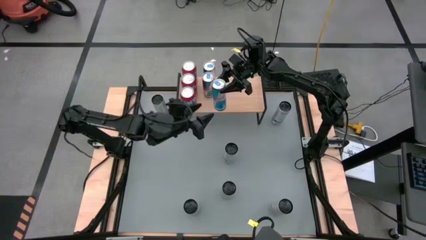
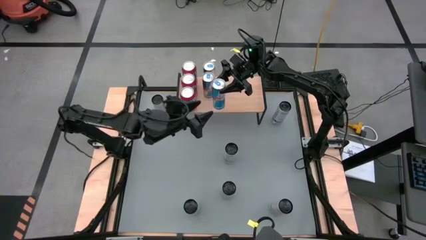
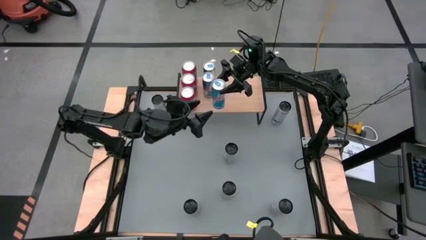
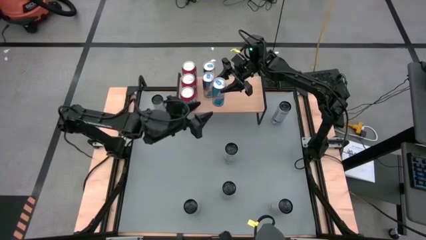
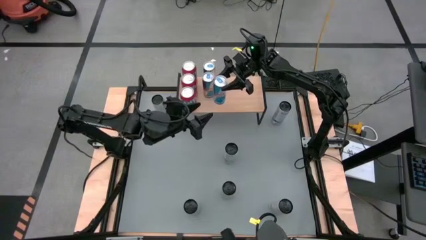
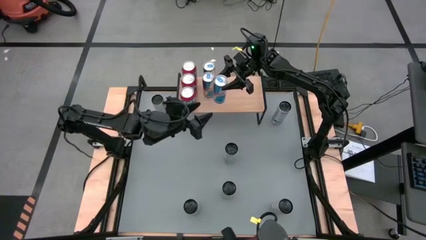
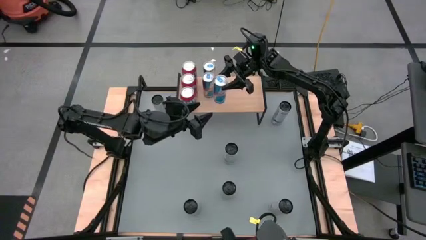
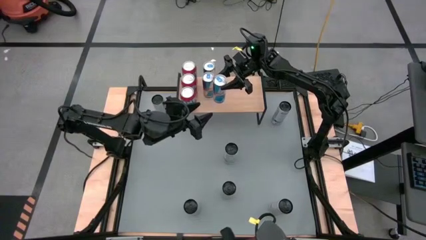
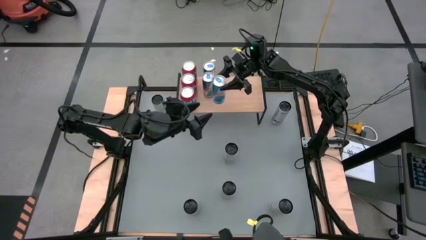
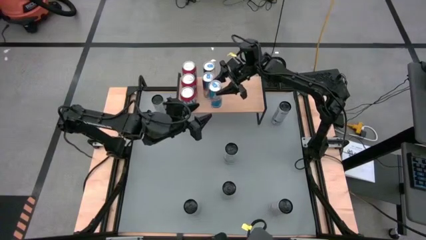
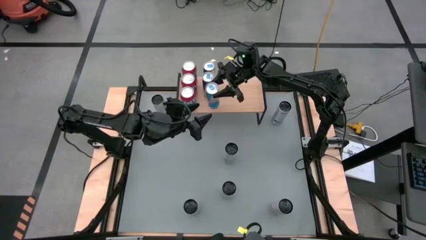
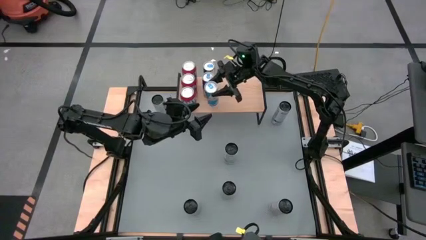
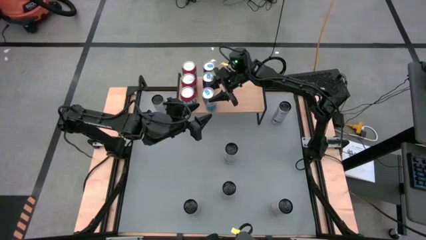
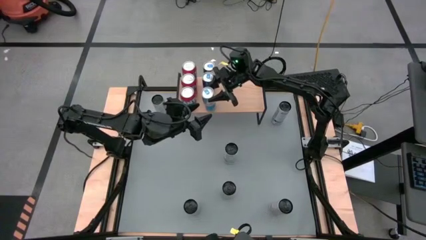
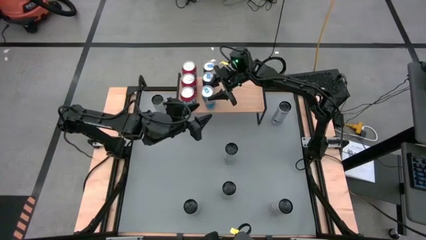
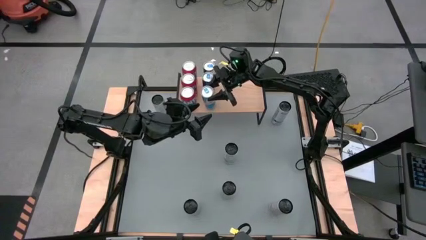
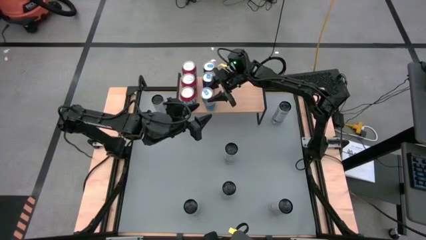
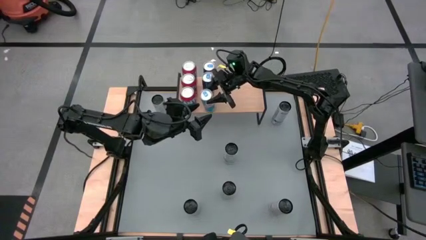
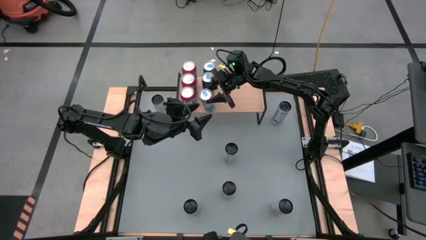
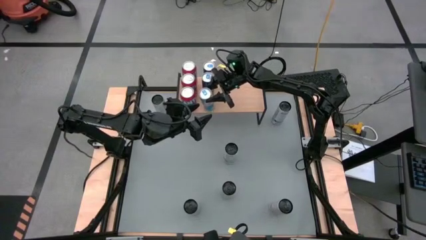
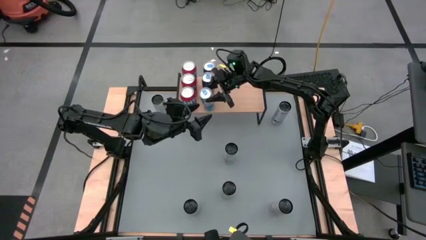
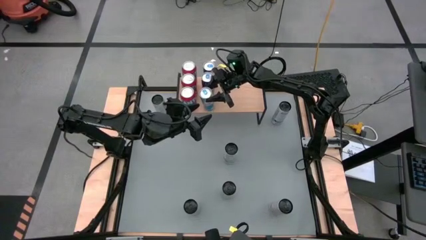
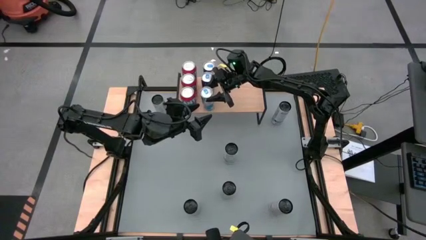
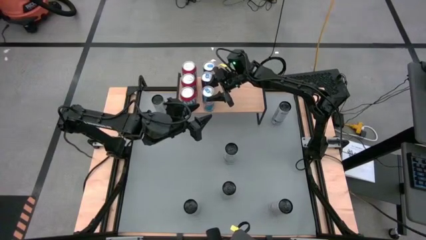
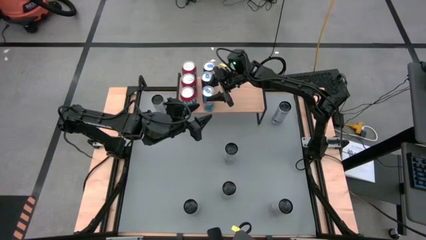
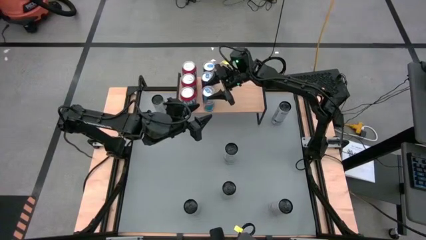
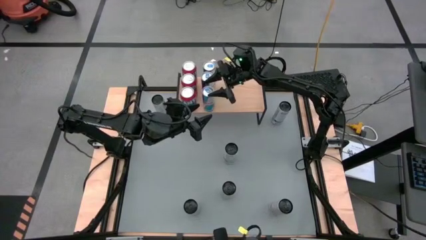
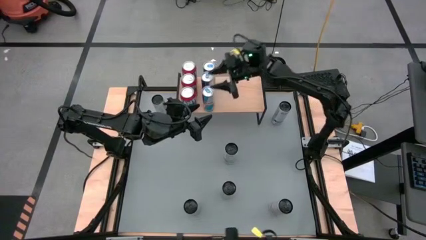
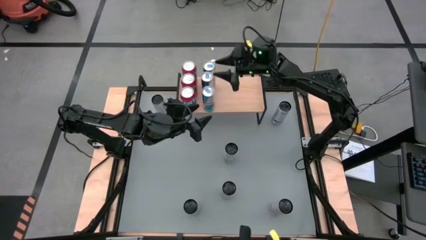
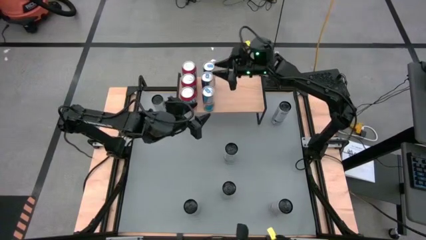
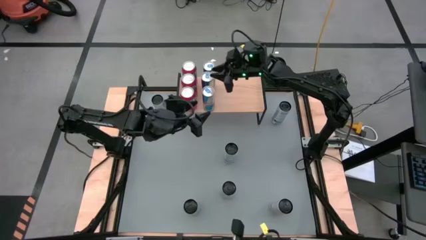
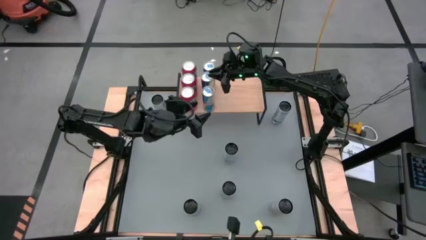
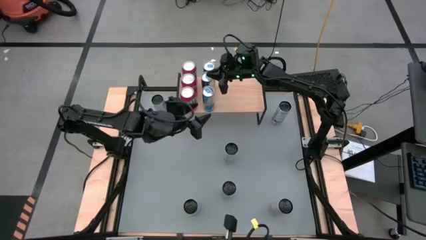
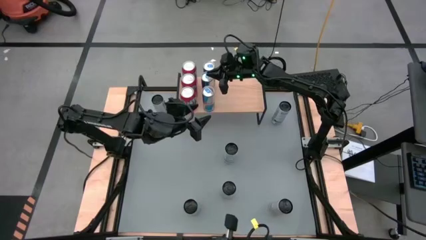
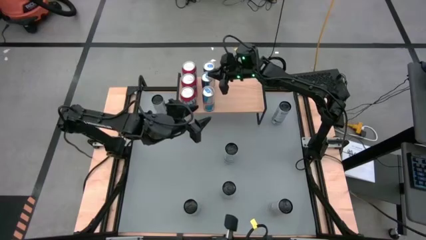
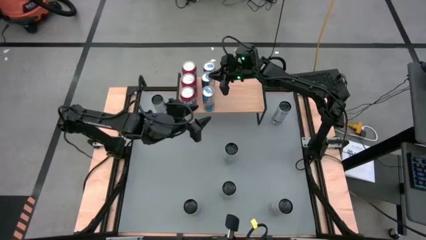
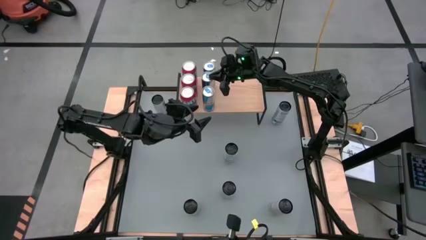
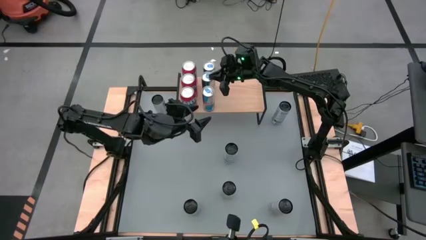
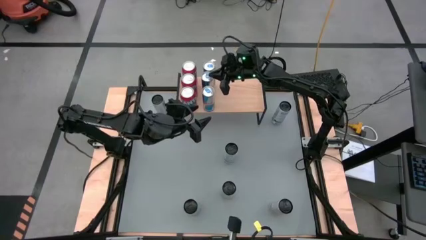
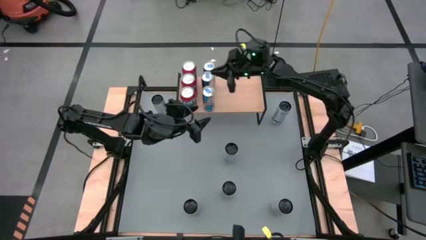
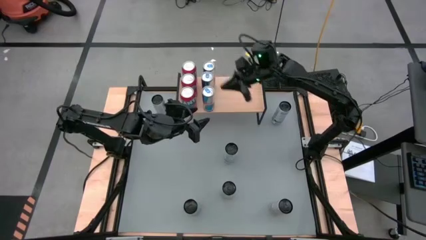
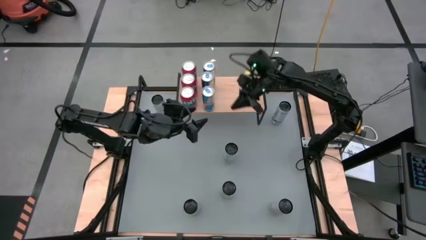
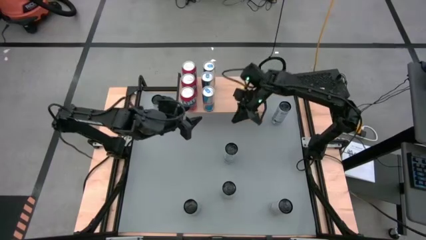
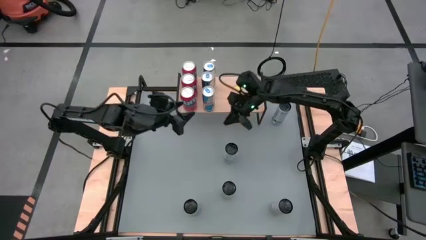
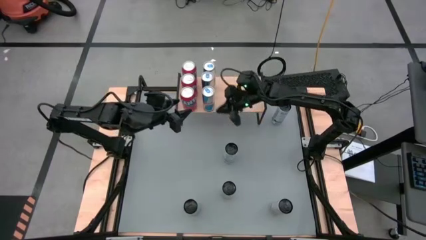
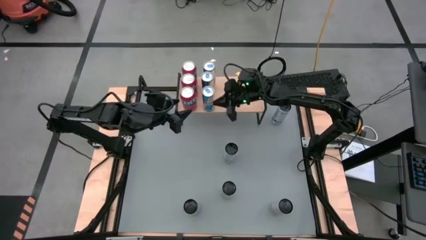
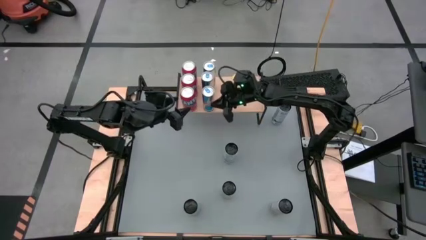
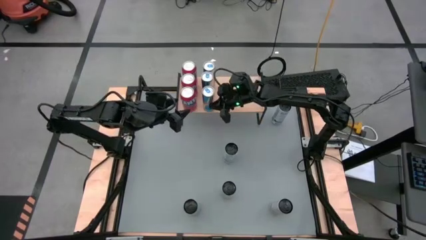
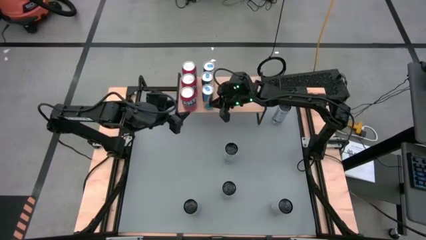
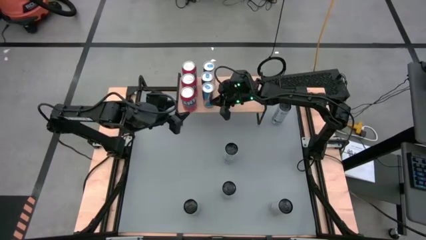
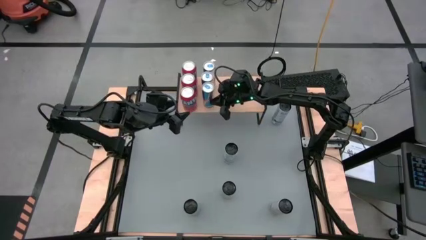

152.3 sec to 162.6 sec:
Task: Place canned beverage on shelf
Put the blue soda can on the shelf aligned with the other blue soda cans

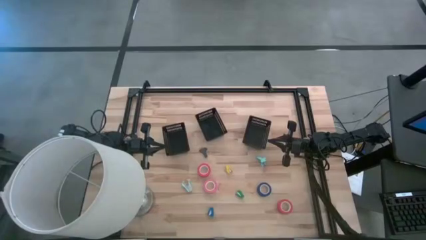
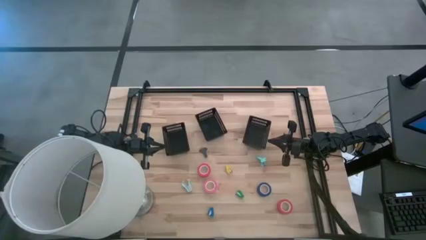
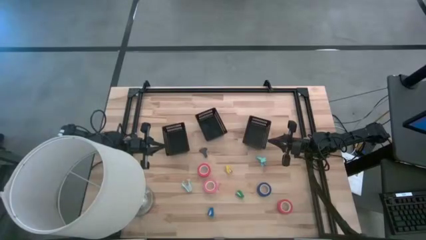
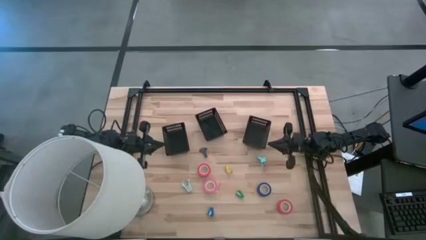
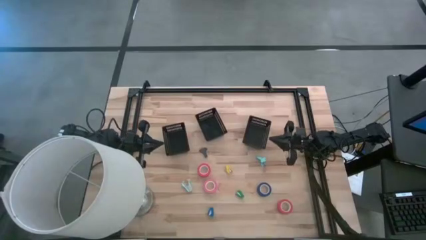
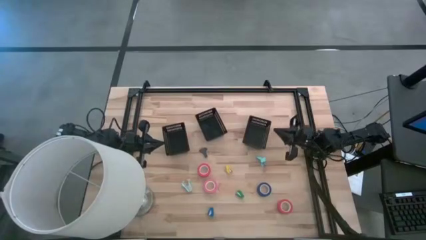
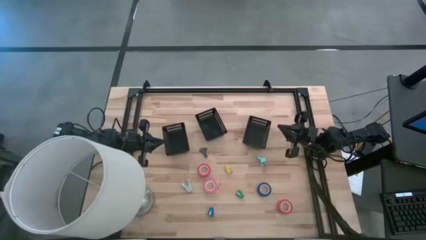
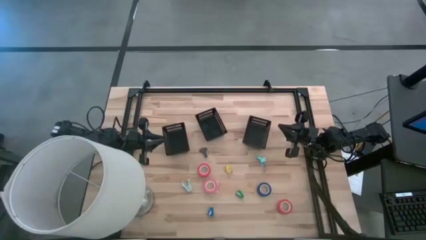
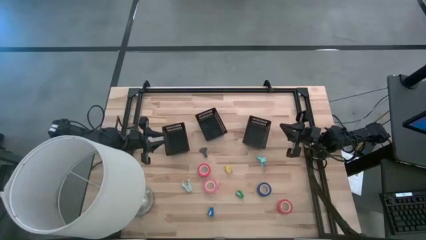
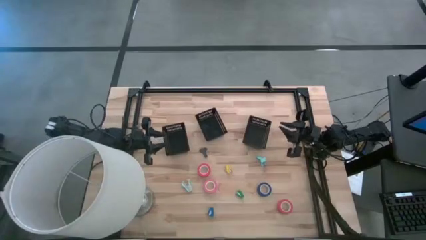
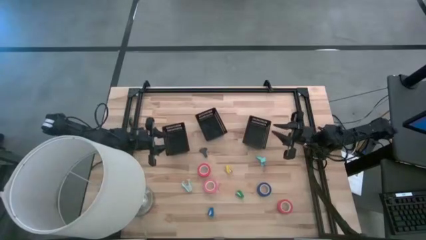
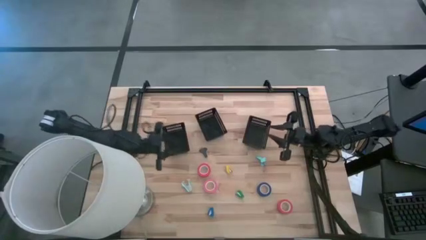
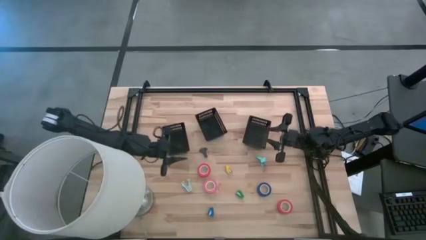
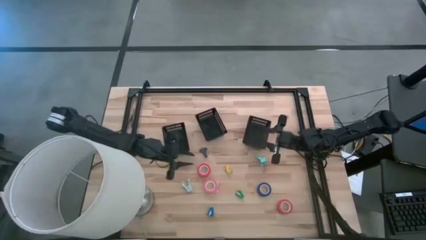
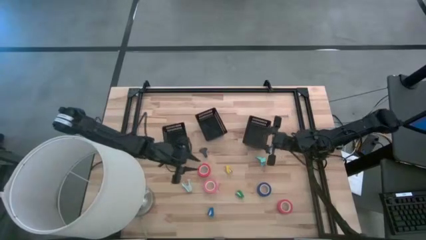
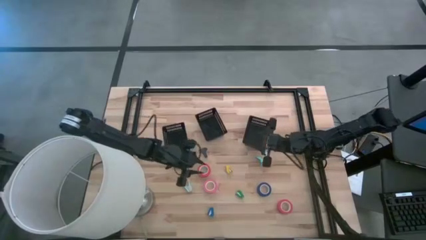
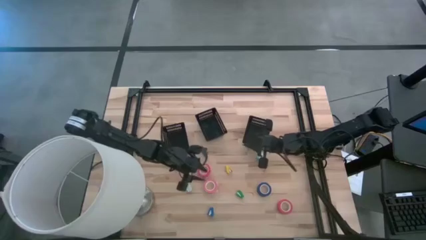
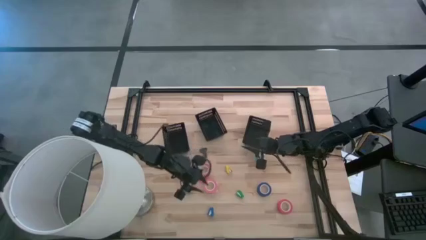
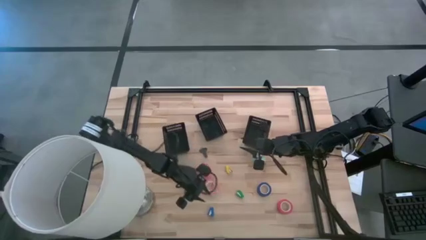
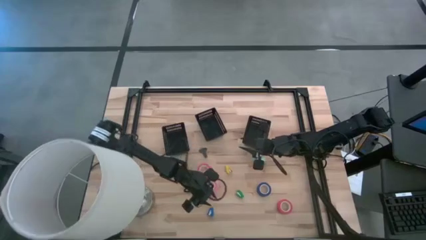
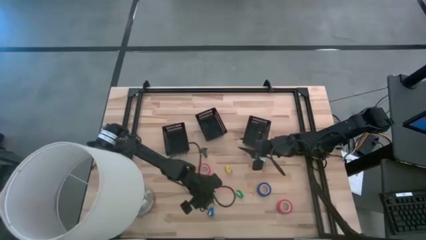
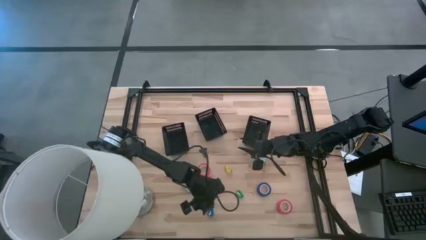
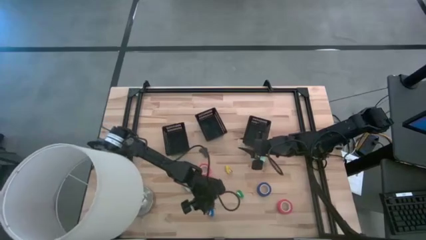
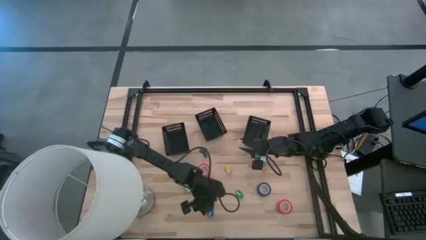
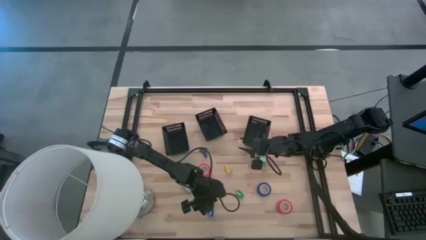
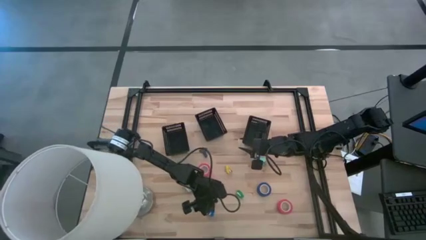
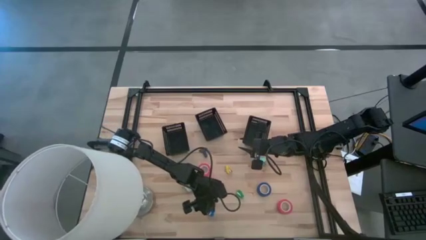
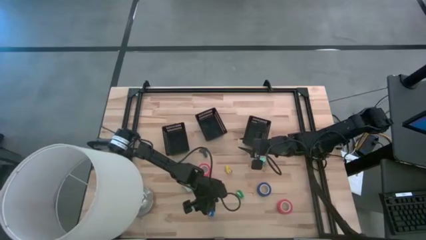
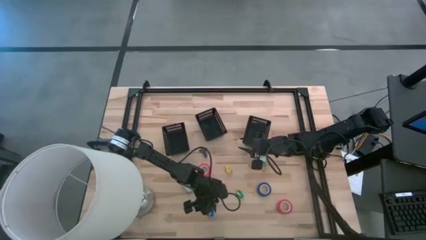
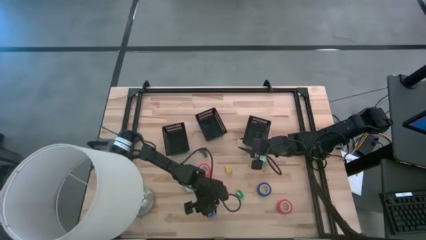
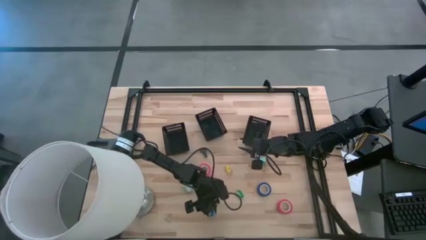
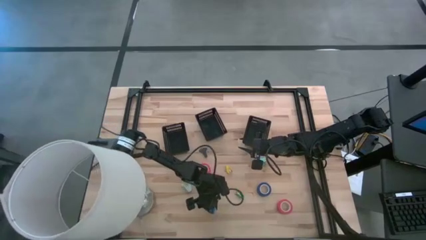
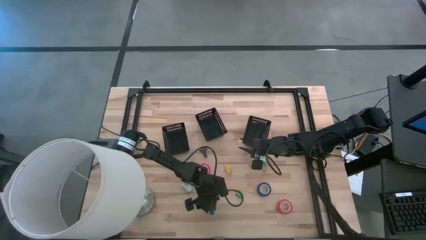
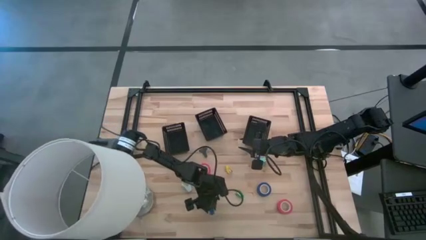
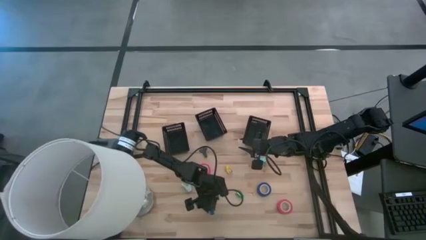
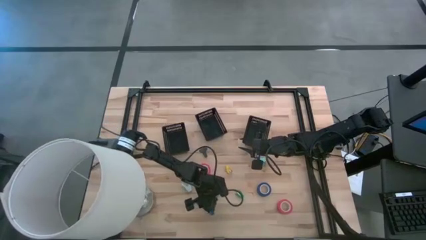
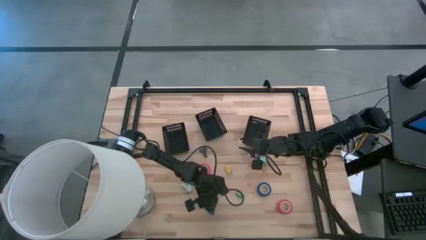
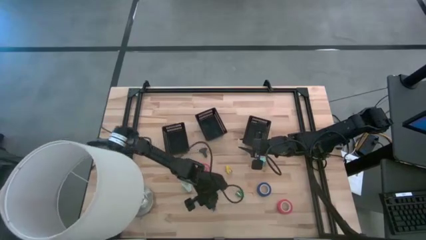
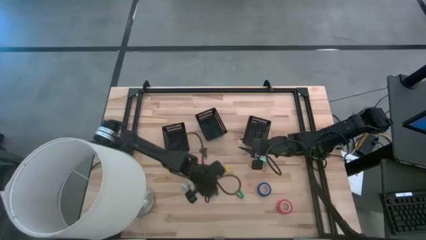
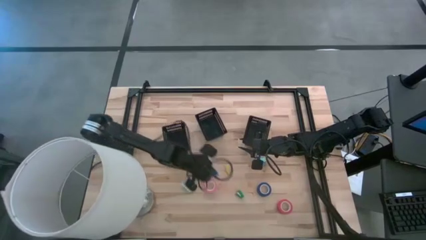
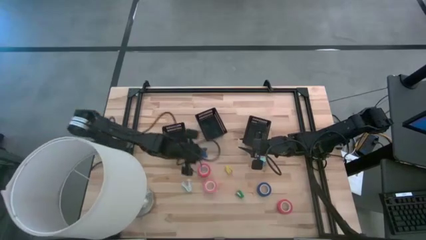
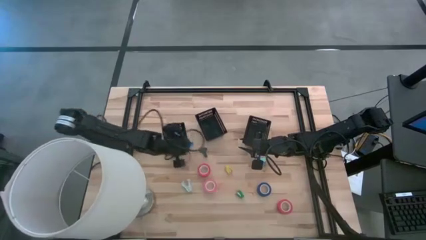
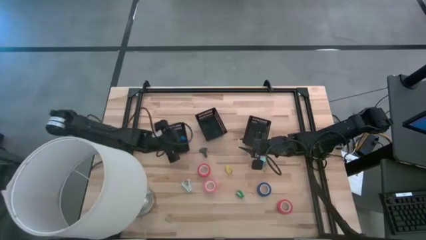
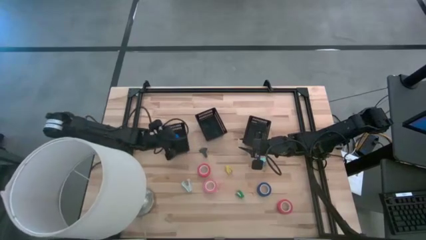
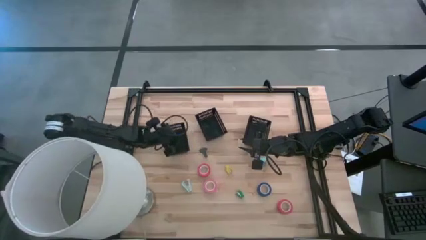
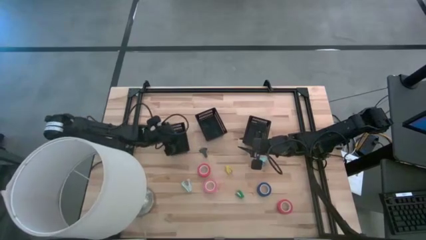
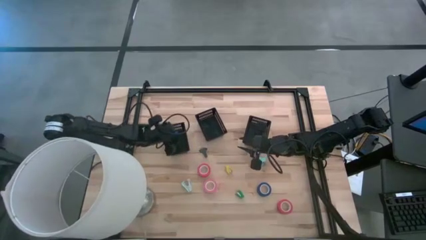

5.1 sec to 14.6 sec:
Task: Pick and place Stapler, Stapler remover, tape
Put the blue stapler into the left black bin
